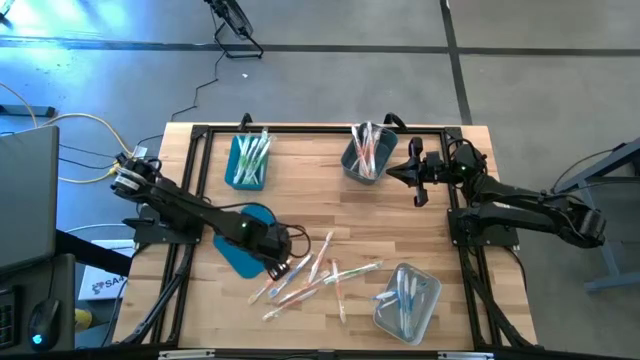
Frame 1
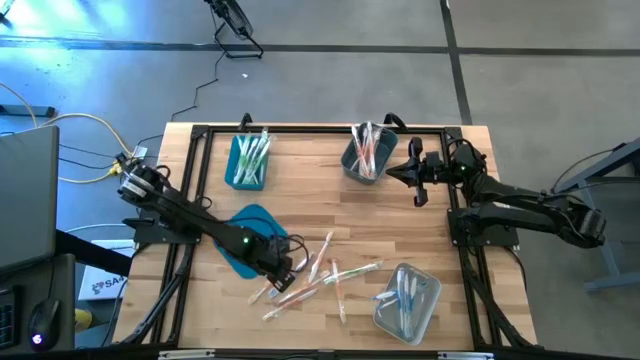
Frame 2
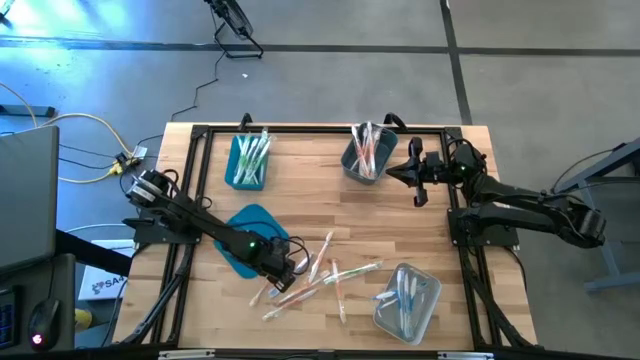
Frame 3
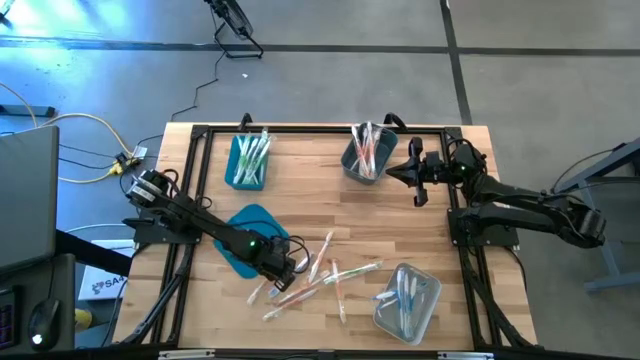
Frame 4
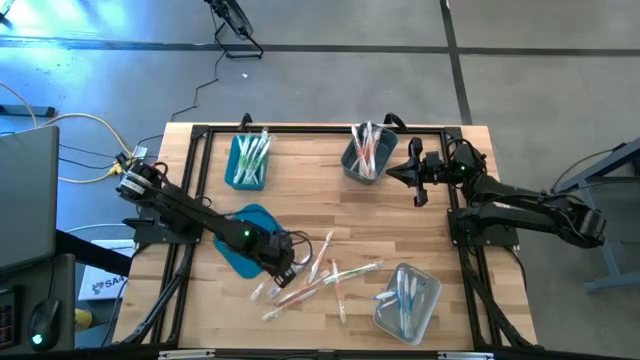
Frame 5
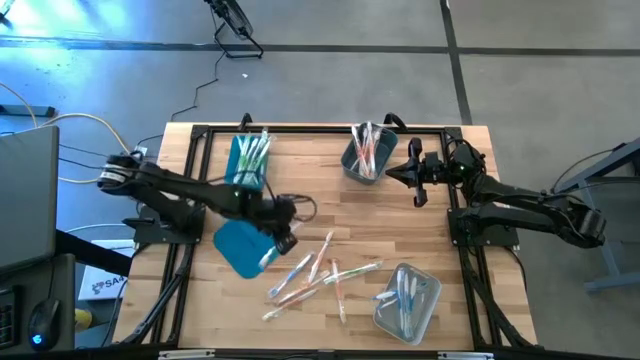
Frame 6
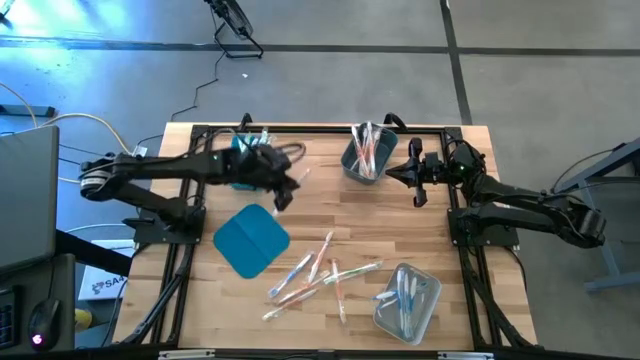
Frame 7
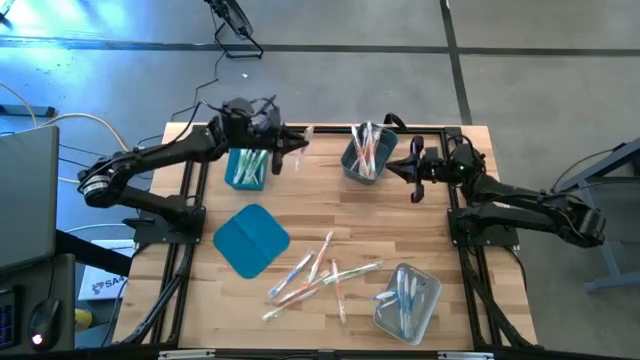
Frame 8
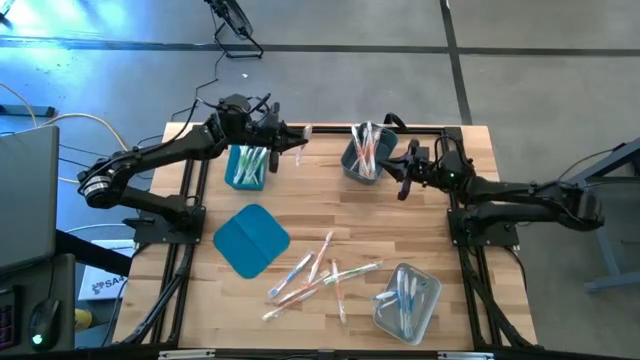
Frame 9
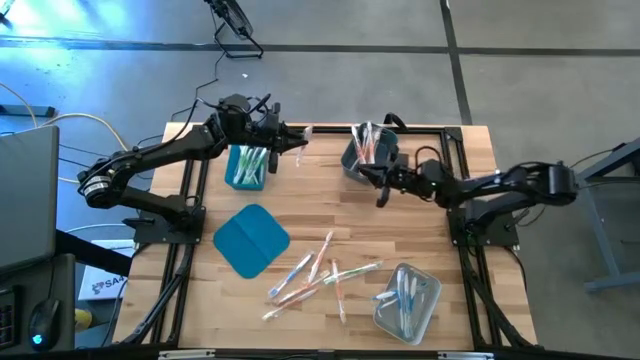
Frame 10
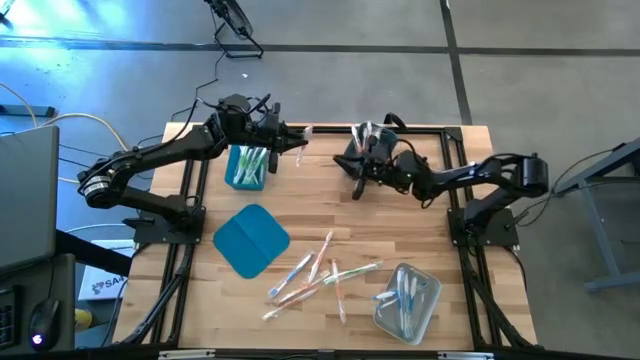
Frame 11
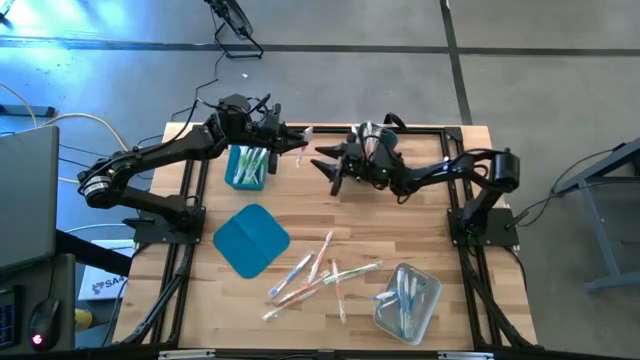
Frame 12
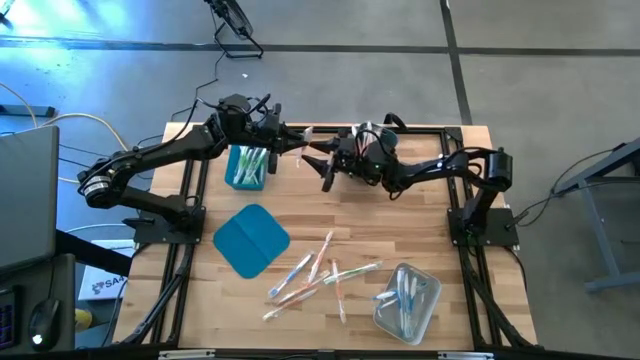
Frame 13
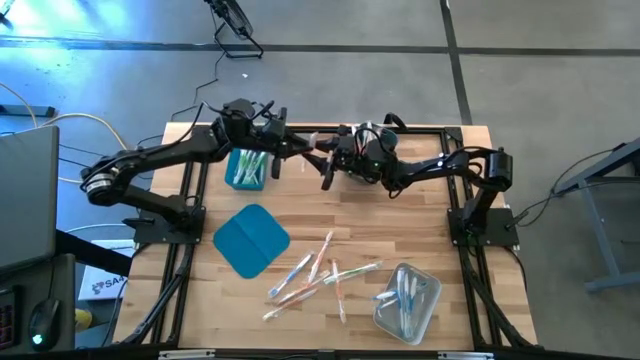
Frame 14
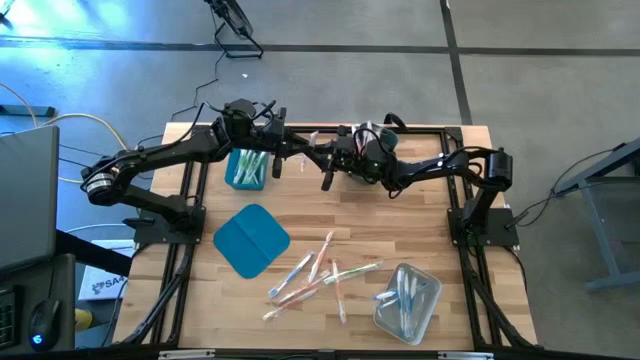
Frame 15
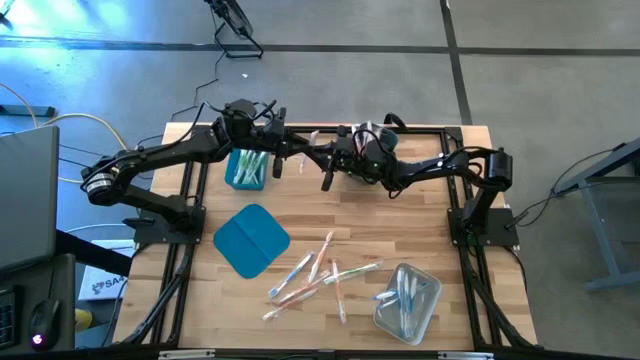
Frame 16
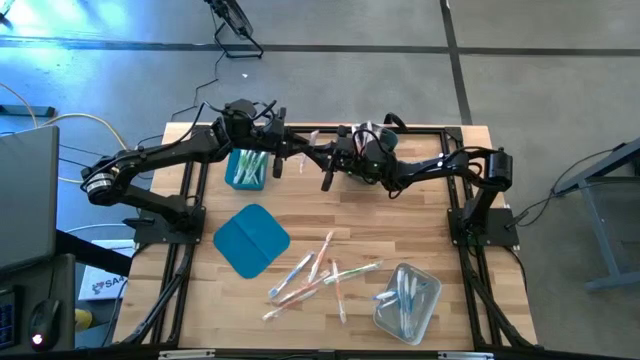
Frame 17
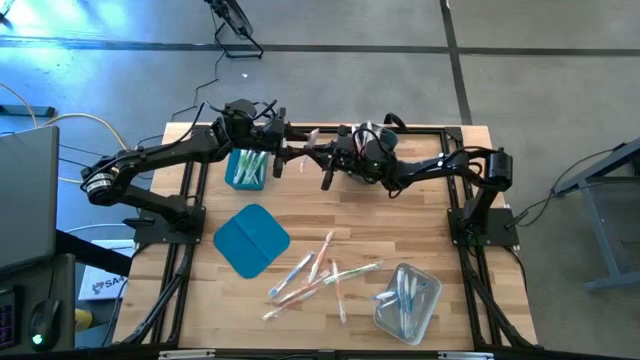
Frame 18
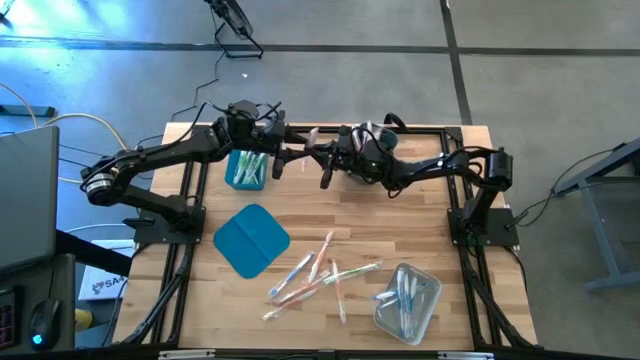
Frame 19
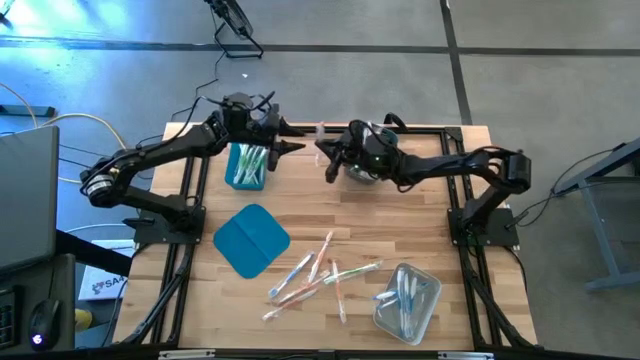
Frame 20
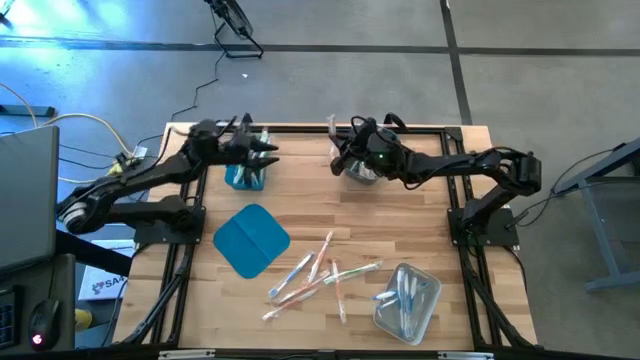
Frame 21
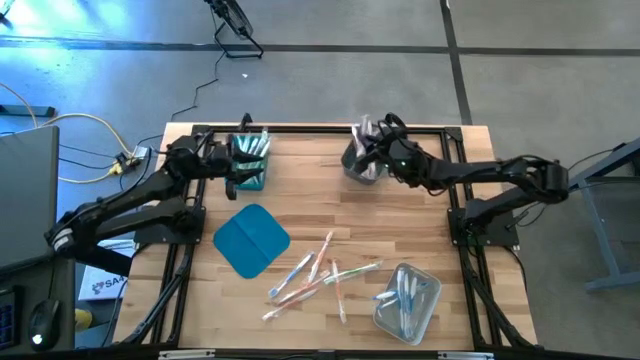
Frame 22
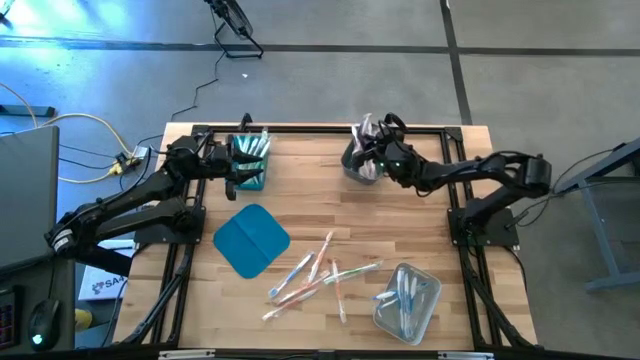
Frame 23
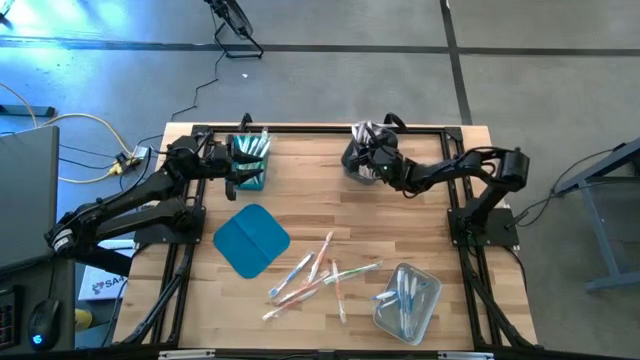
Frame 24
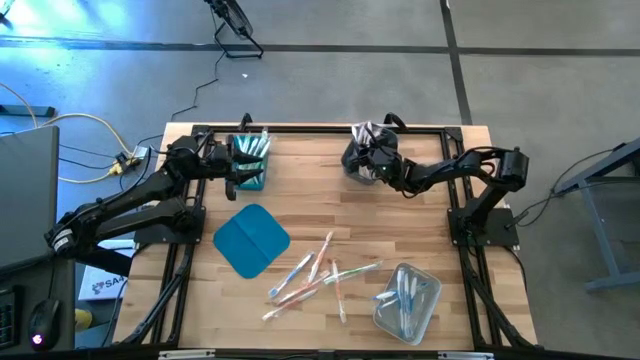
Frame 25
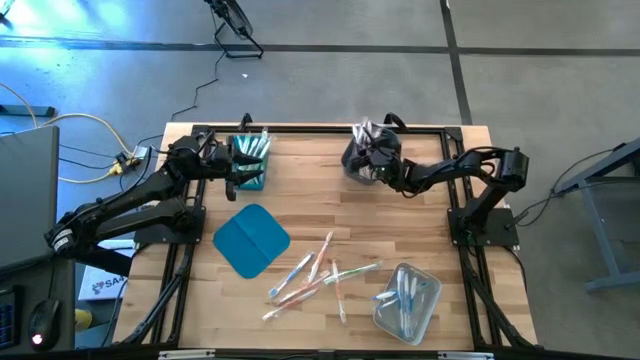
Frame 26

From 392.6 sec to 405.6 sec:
Task: Pick & Place Toothbrushes
Put the orange toothbrush into the dark gray bin

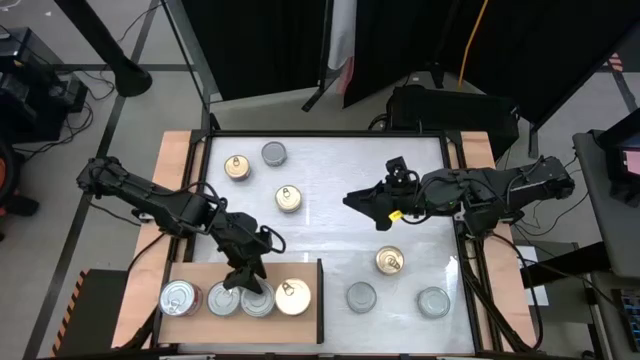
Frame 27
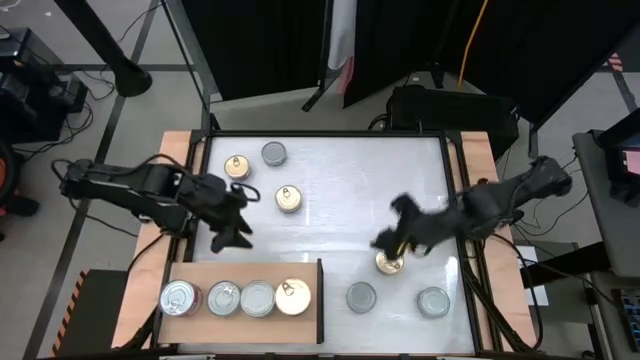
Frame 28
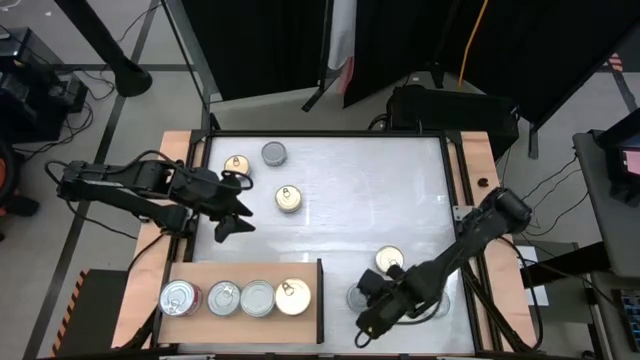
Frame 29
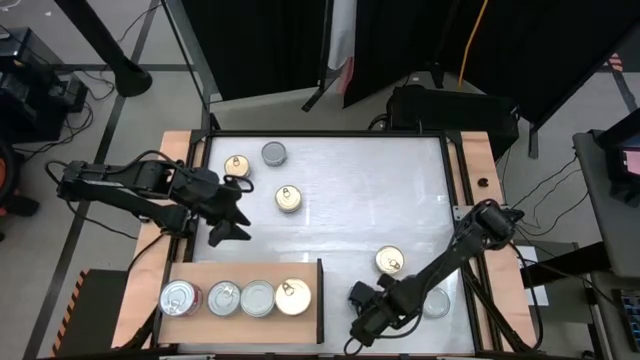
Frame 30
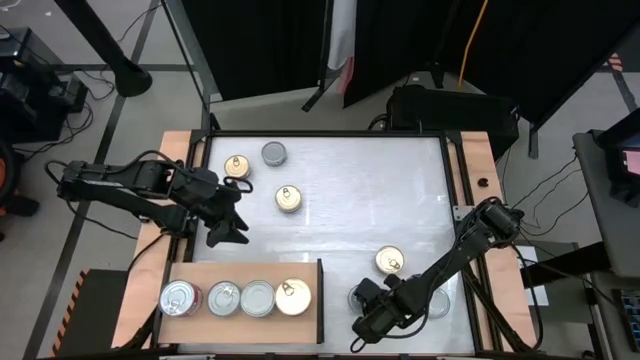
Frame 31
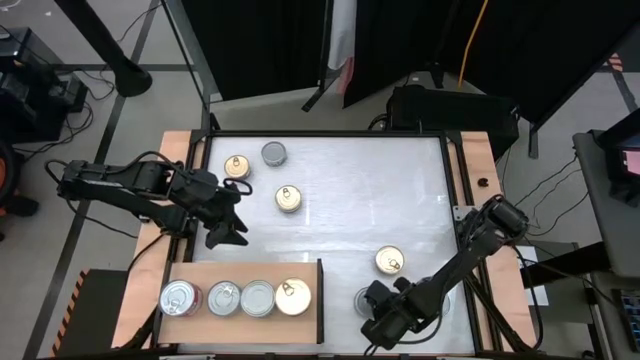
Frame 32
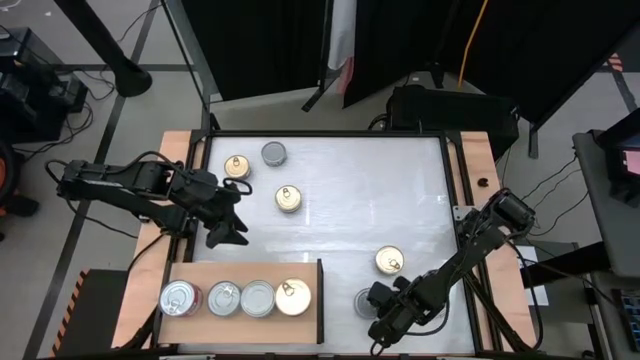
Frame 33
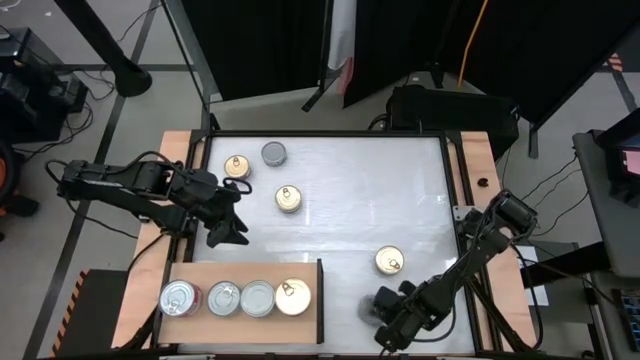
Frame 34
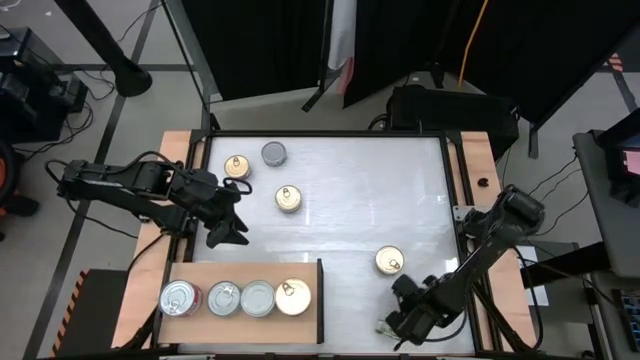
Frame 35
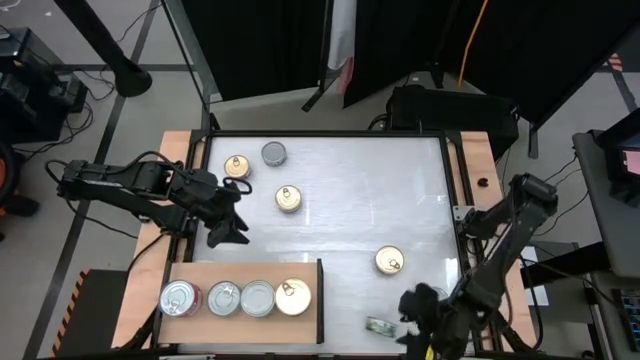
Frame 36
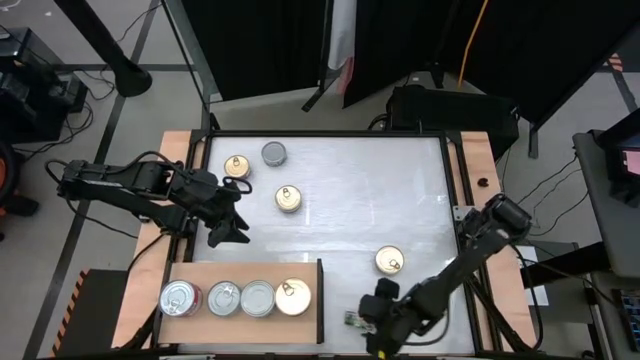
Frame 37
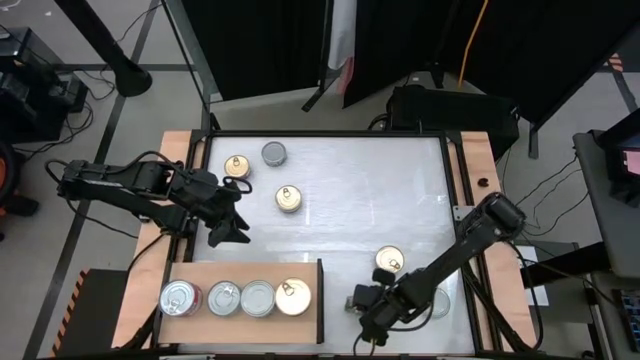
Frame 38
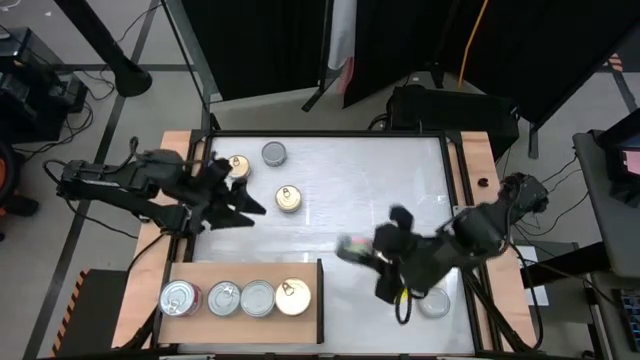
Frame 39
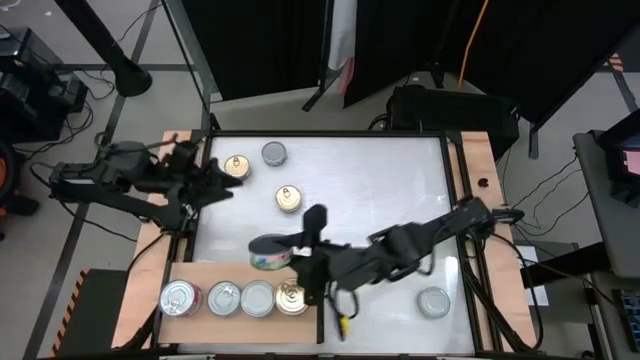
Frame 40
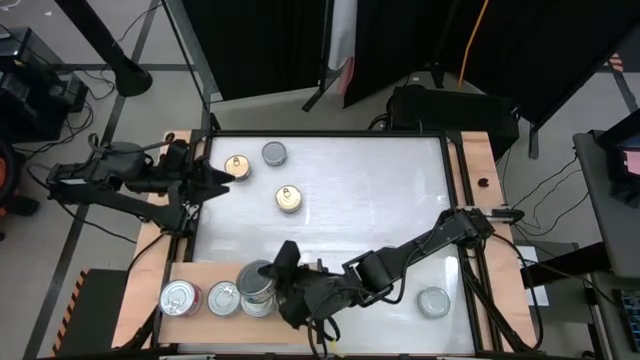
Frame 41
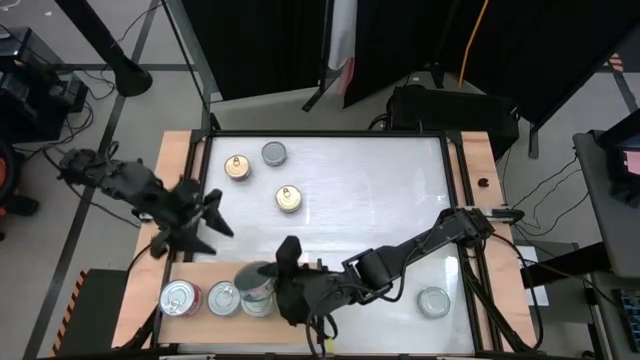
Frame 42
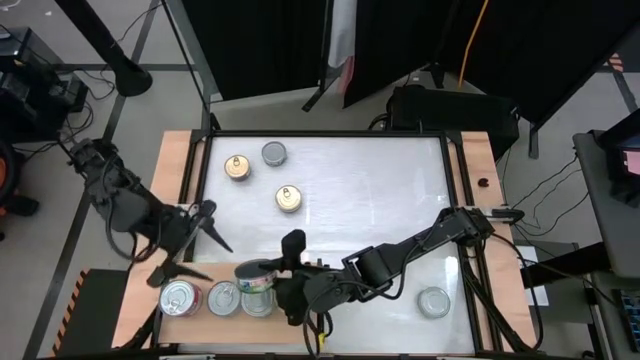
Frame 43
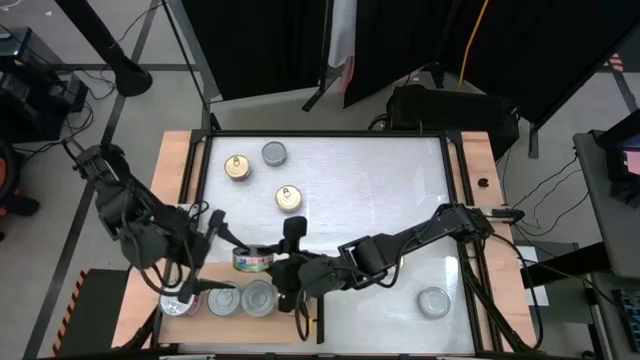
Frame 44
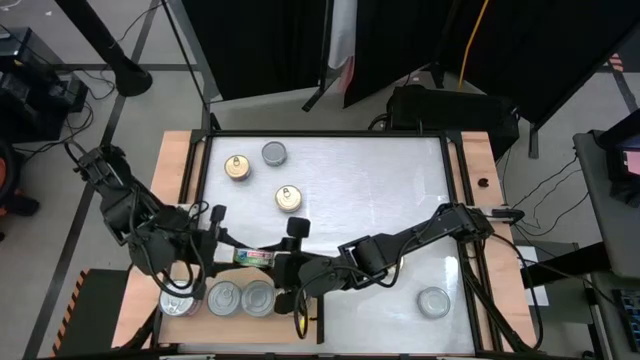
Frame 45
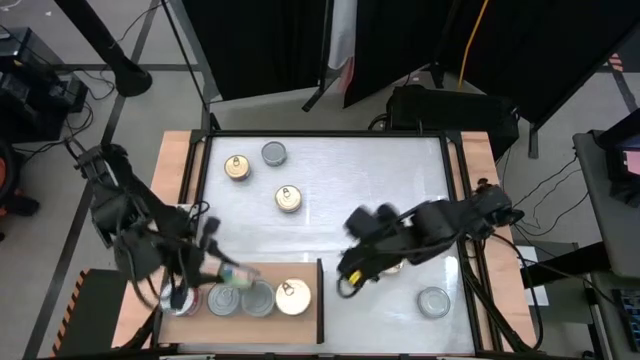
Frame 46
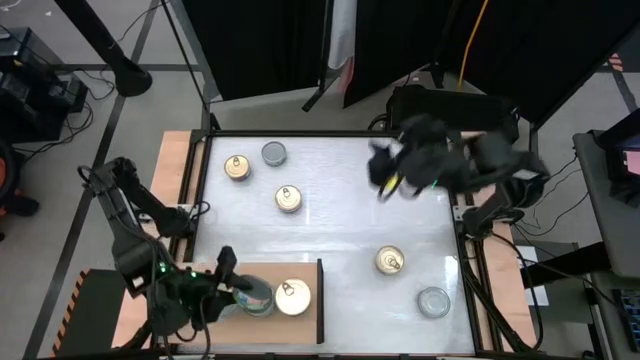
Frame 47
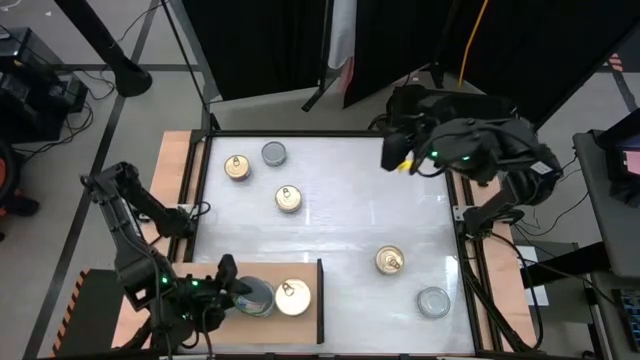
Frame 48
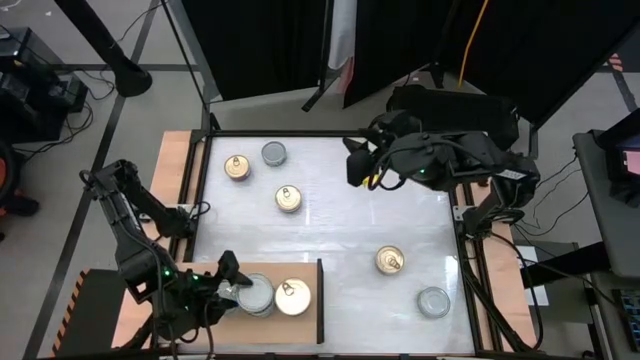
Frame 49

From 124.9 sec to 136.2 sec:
Task: Stack canned seafood by type on shelf
Stack the green white tuna can on top of the other green white tuna cans on the shelf
